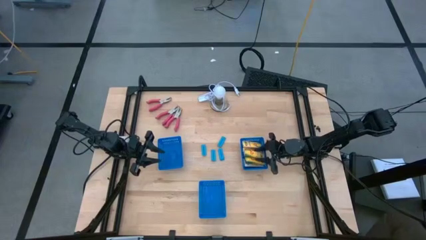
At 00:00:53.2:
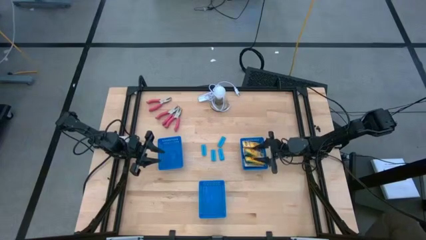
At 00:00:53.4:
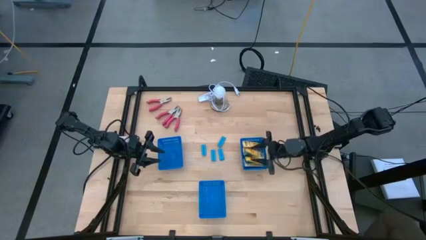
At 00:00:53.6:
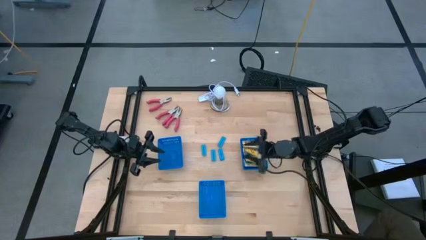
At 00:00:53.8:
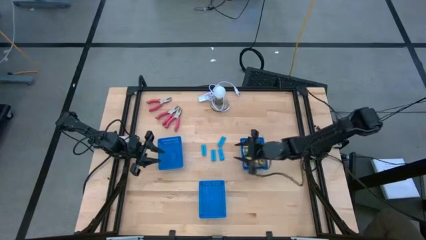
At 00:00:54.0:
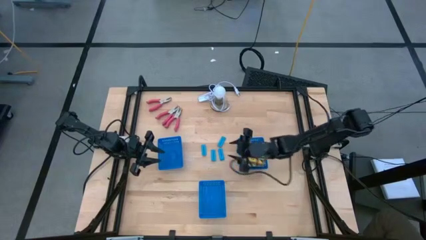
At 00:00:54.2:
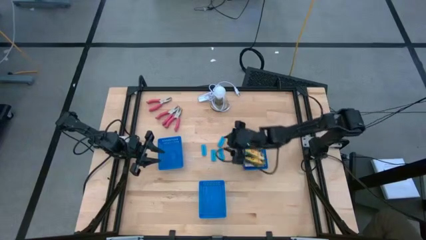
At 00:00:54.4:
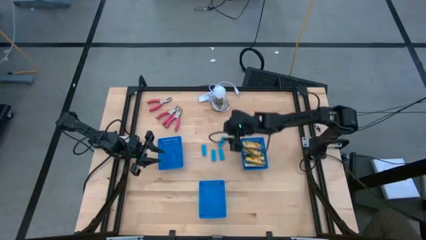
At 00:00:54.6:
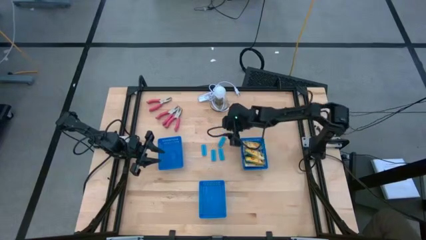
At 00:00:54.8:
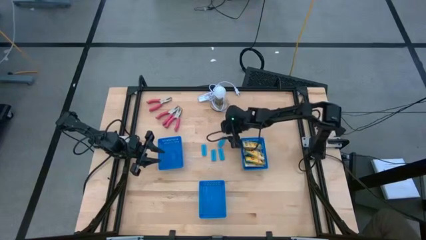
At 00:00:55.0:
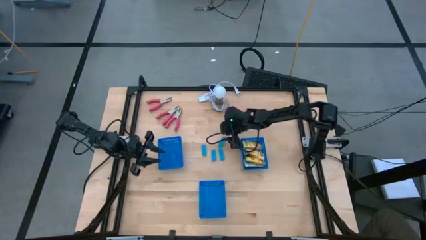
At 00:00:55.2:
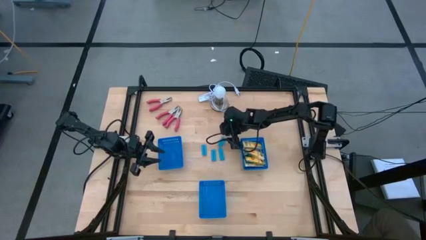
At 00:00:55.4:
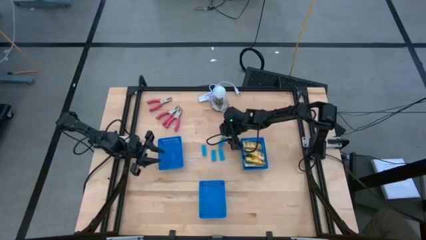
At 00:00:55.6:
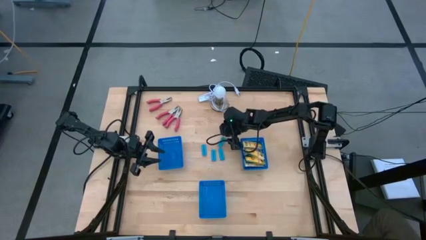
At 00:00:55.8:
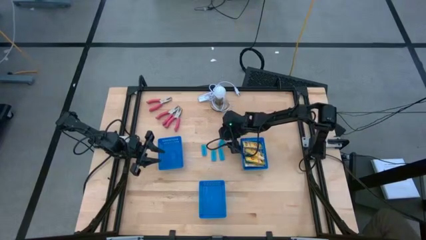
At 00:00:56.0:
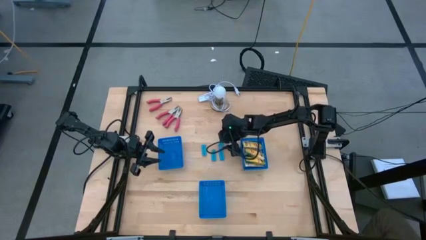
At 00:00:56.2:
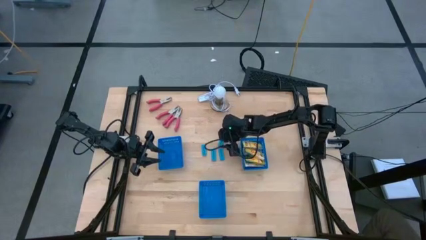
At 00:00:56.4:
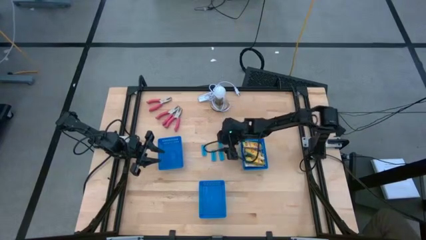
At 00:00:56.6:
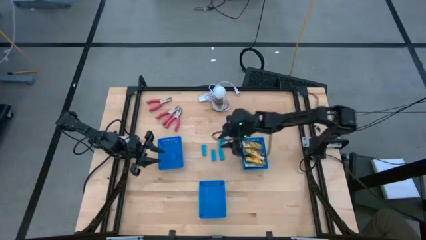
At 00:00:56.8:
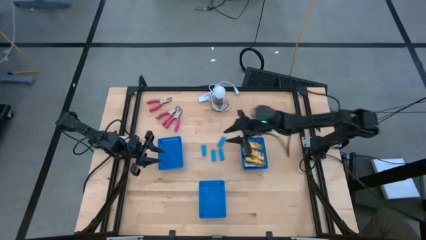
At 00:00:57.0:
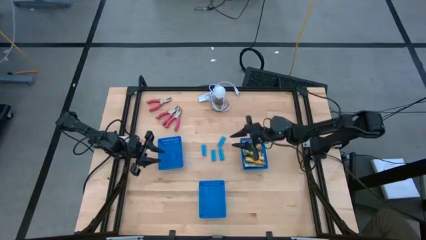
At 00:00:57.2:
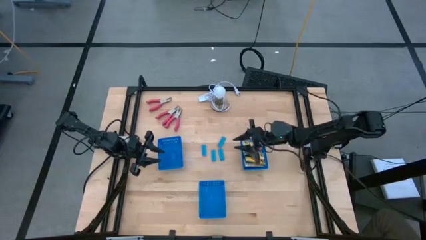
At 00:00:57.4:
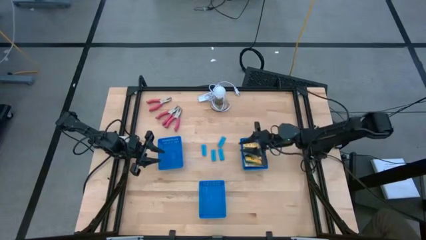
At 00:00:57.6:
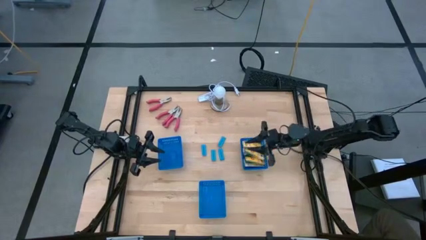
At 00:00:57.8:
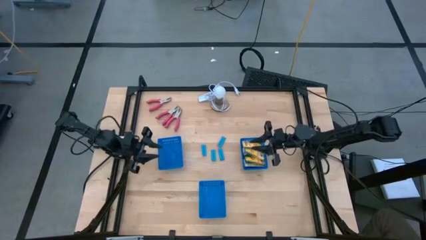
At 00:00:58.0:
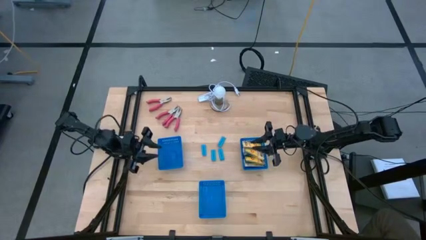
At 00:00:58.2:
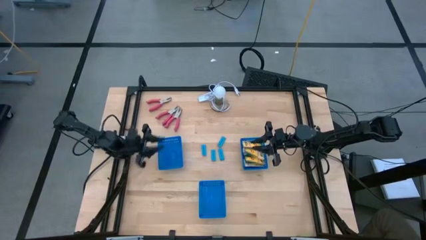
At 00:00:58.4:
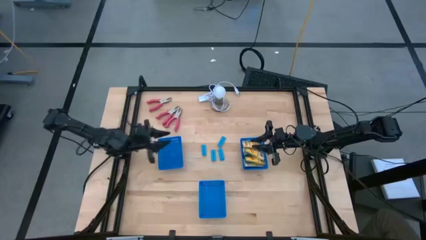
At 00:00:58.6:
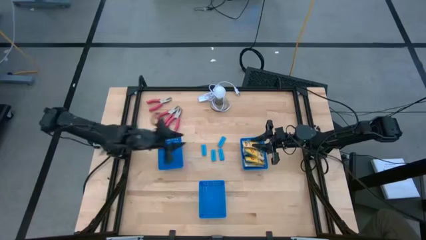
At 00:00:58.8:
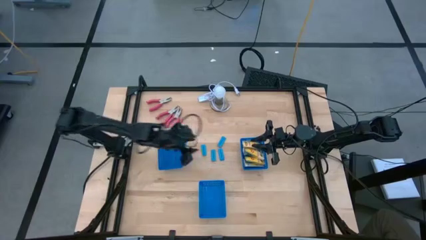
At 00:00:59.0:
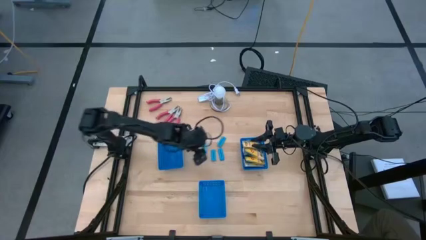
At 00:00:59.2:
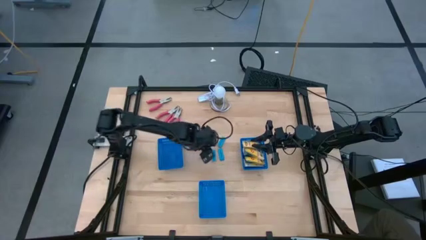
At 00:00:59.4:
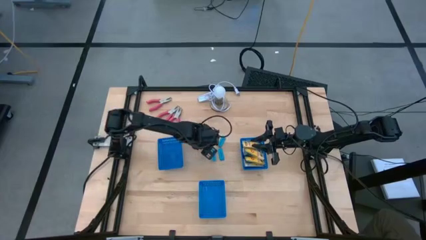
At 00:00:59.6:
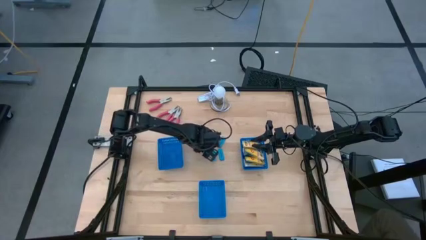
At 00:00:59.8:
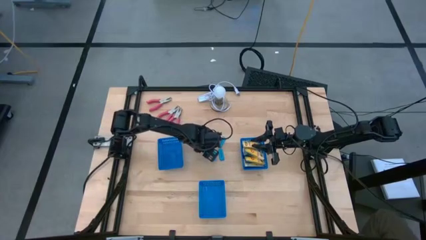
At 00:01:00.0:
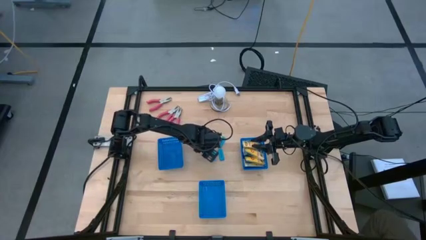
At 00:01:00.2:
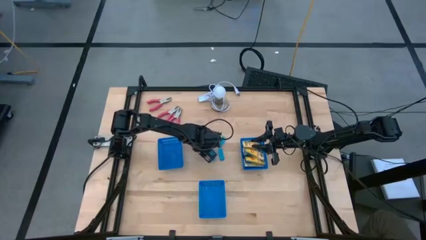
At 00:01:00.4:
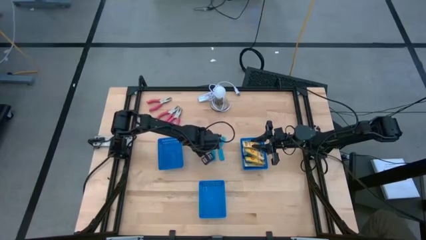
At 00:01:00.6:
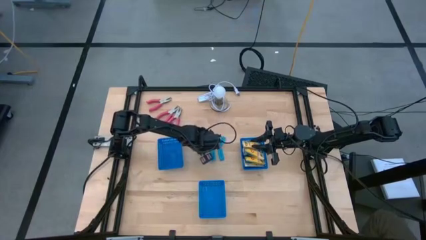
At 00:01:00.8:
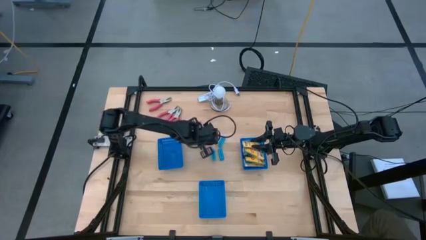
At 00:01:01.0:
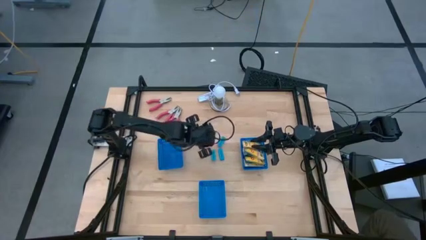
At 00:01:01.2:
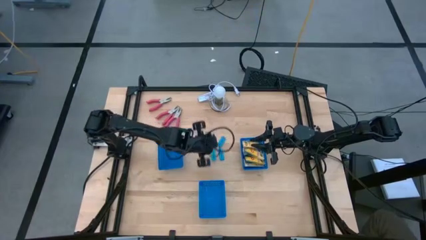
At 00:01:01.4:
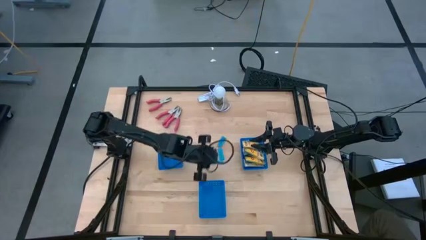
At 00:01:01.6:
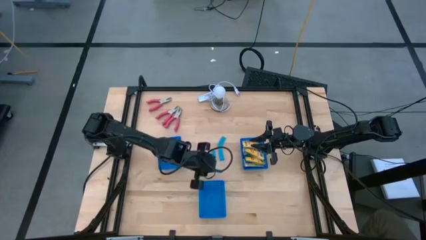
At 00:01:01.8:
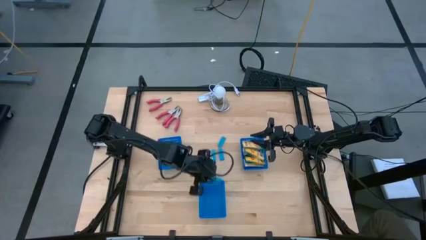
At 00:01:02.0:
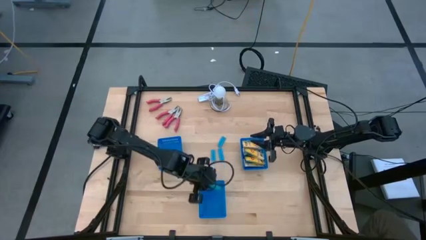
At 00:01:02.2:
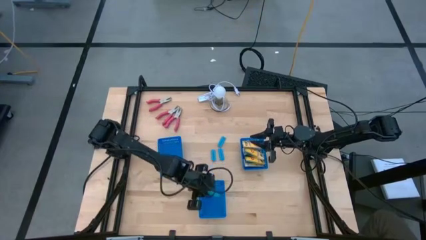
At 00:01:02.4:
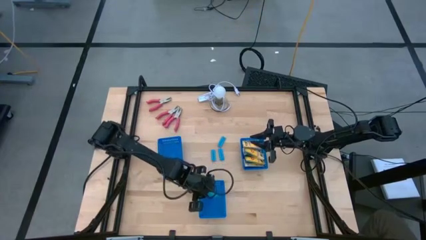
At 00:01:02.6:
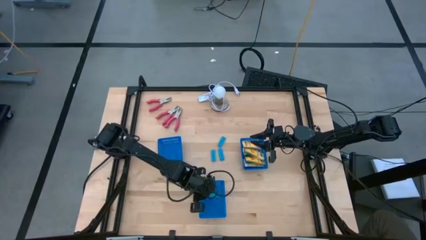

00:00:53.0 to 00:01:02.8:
Task: Pick & Place School Supplies
Put the blue eraser into the bottom blue bin

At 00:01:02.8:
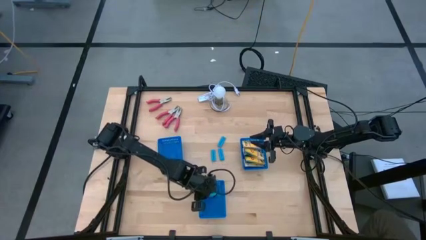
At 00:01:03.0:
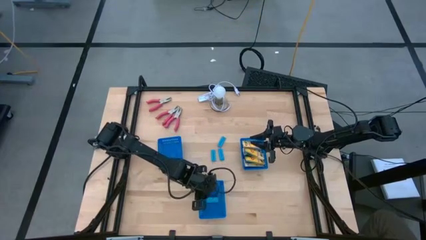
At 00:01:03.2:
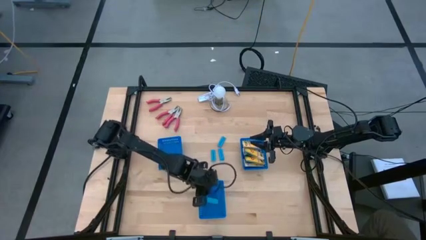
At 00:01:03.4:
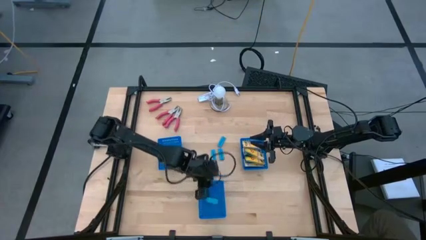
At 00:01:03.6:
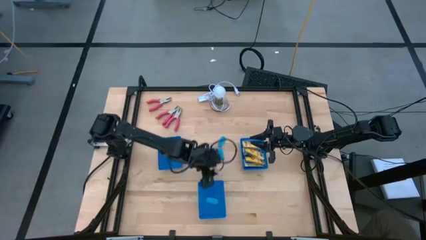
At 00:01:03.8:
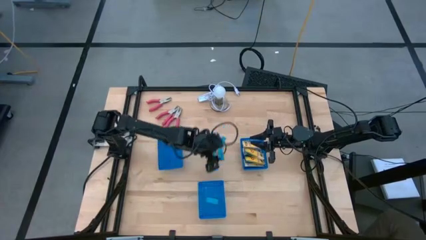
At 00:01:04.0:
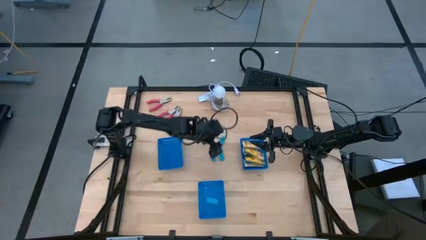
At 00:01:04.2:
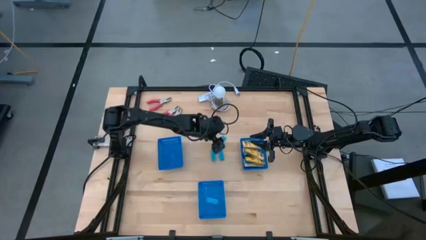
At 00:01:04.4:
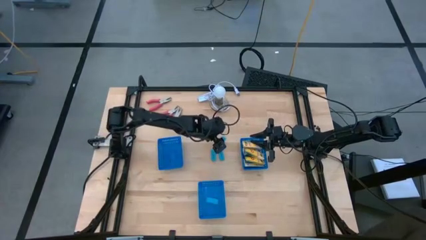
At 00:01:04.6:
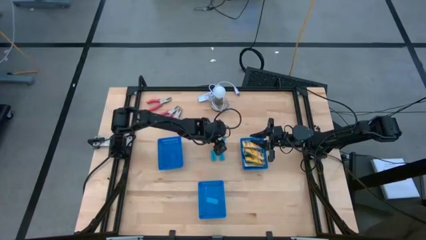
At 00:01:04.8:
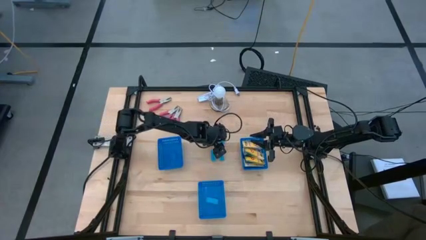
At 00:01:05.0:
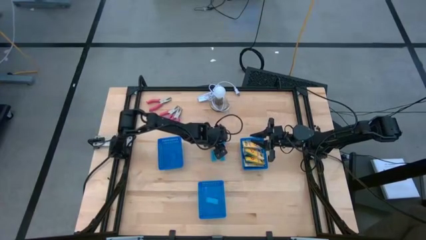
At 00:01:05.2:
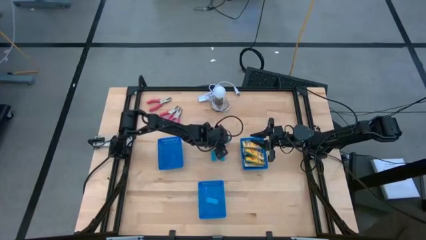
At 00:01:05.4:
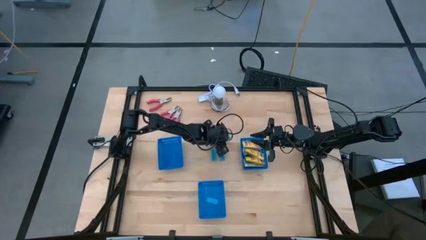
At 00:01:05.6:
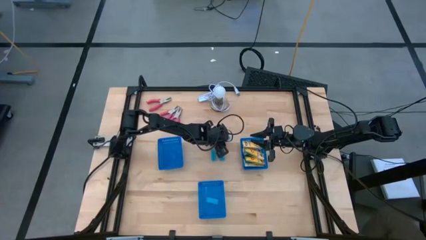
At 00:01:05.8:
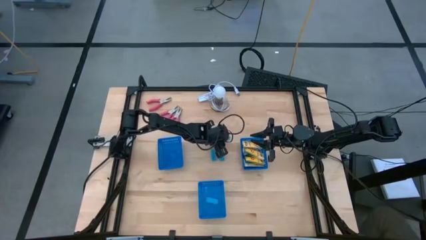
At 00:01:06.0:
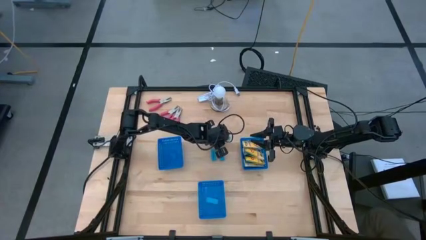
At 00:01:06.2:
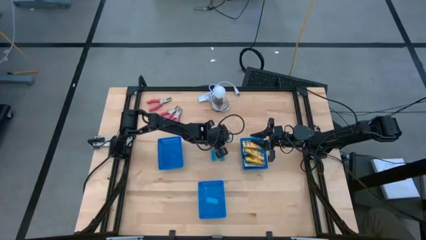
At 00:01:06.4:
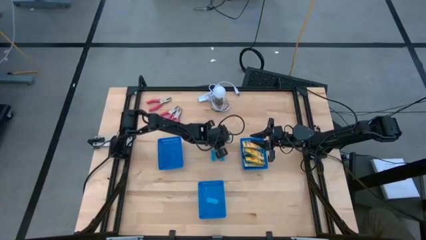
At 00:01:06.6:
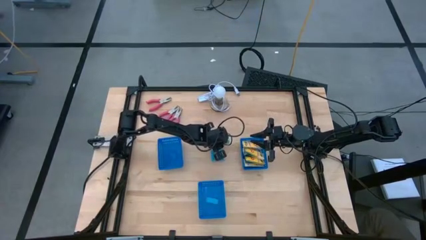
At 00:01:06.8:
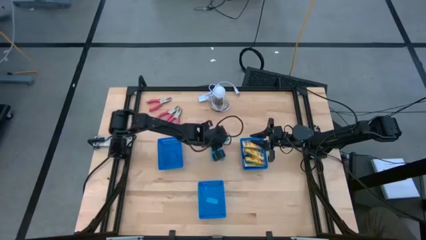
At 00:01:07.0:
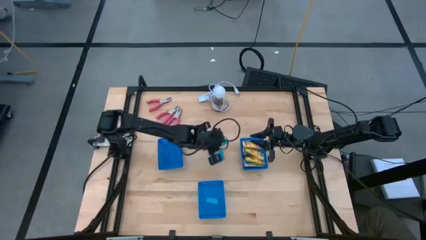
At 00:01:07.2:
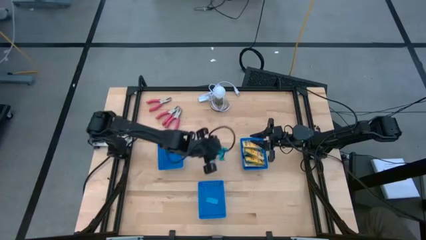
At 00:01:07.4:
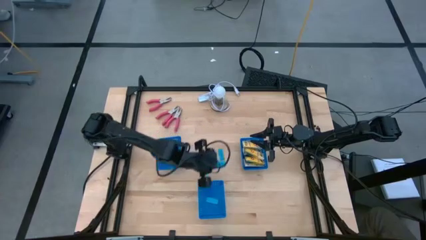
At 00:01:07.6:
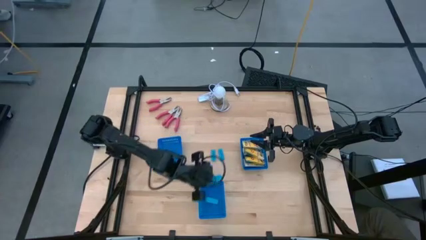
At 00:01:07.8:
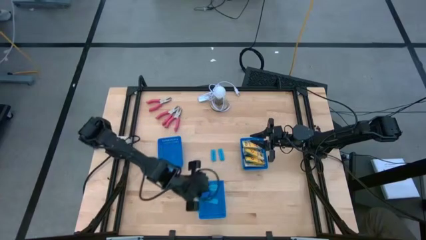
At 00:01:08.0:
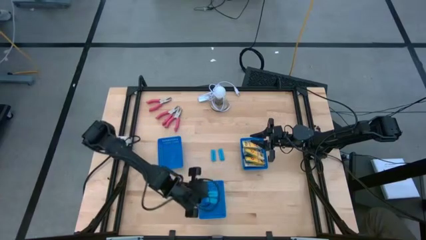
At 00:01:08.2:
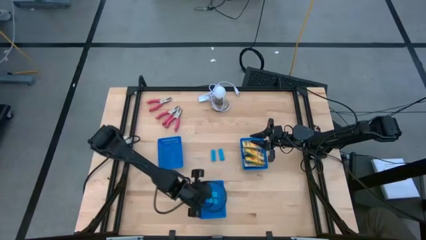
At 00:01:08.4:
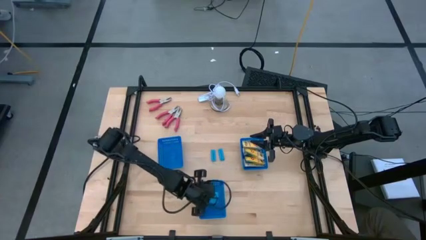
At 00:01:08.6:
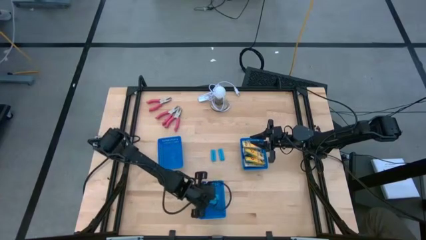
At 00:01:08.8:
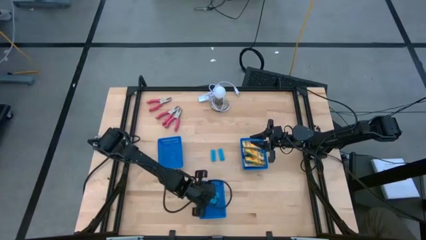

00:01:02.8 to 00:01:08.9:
Put the blue eraser into the bottom blue bin
